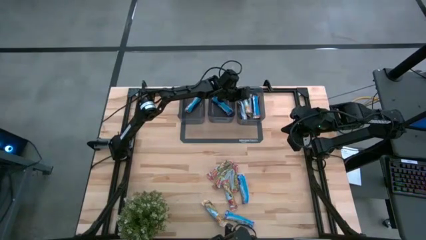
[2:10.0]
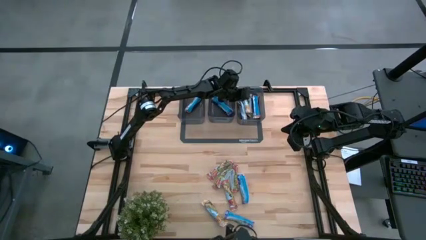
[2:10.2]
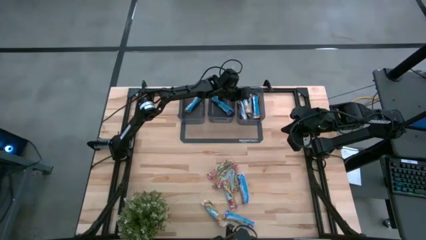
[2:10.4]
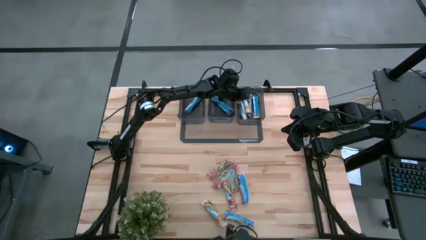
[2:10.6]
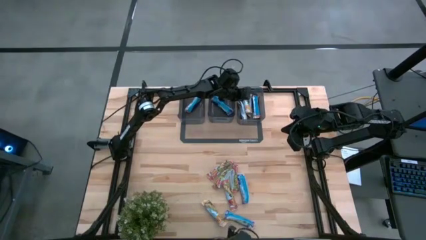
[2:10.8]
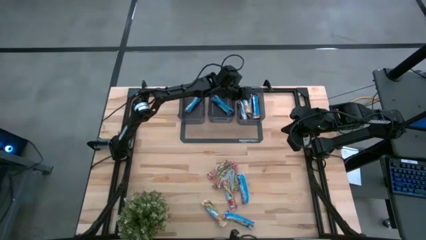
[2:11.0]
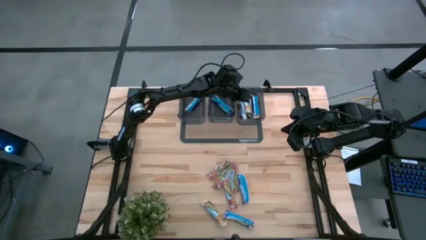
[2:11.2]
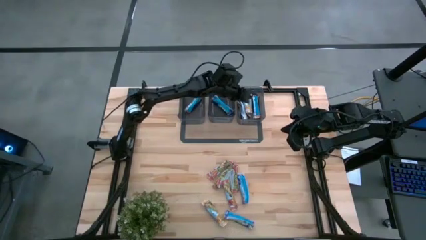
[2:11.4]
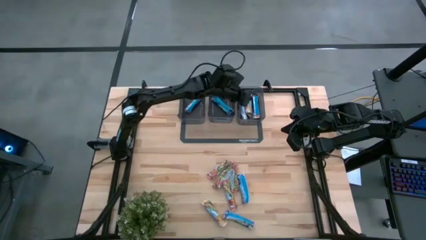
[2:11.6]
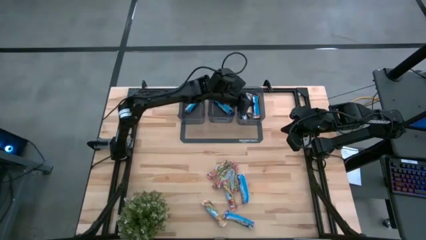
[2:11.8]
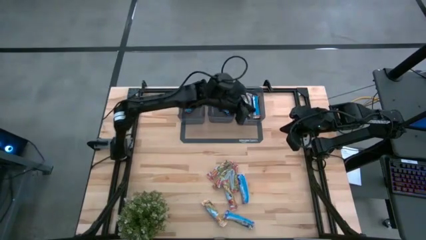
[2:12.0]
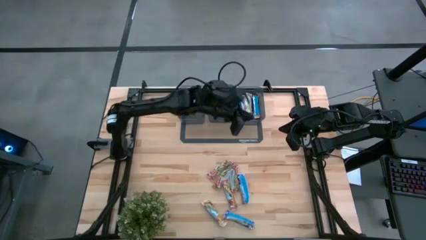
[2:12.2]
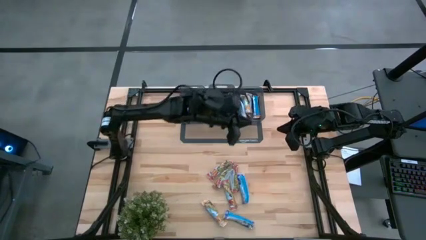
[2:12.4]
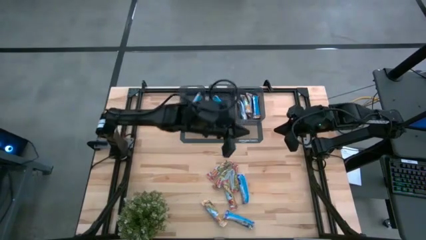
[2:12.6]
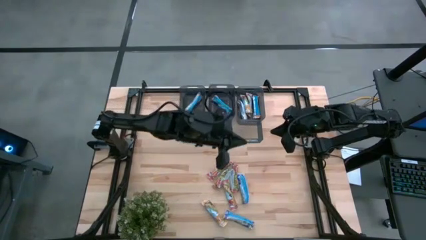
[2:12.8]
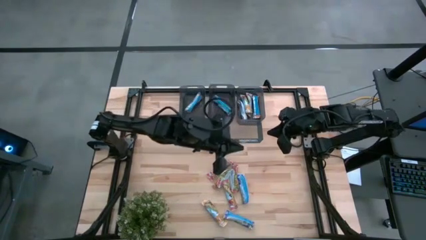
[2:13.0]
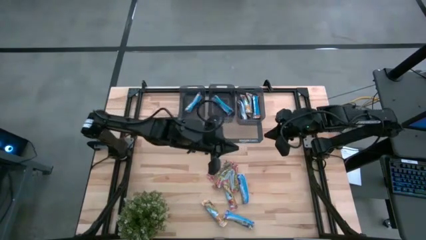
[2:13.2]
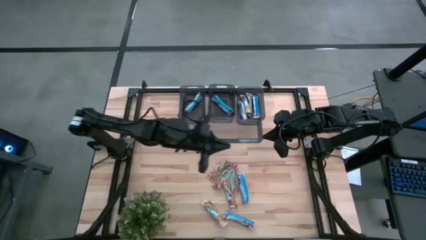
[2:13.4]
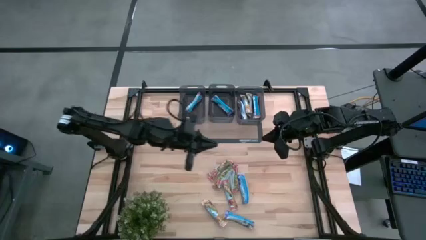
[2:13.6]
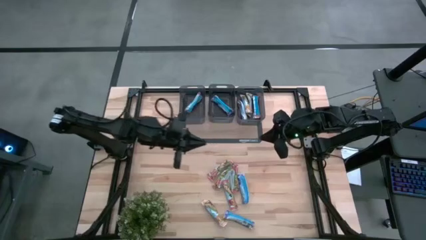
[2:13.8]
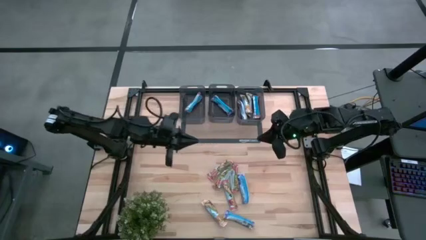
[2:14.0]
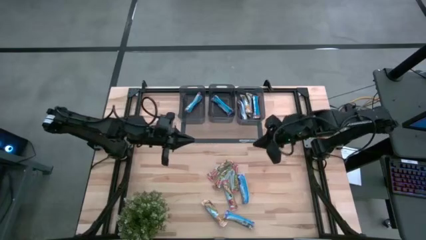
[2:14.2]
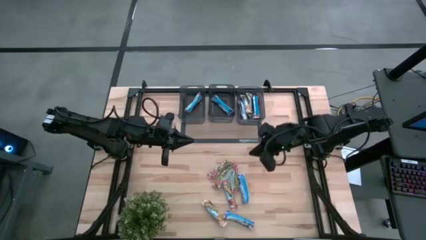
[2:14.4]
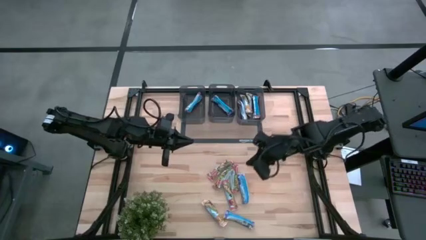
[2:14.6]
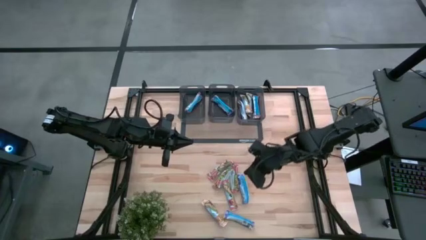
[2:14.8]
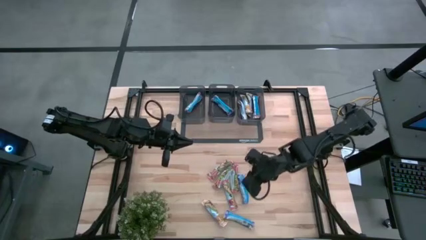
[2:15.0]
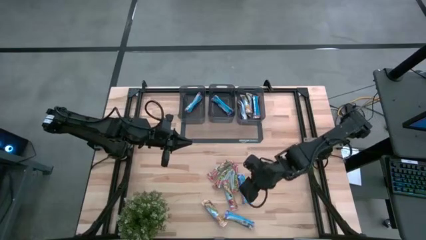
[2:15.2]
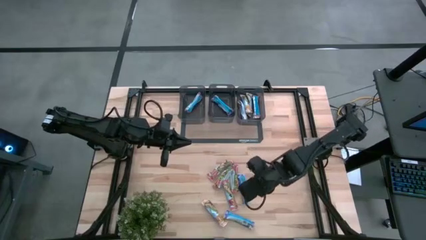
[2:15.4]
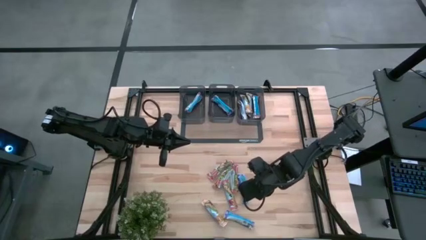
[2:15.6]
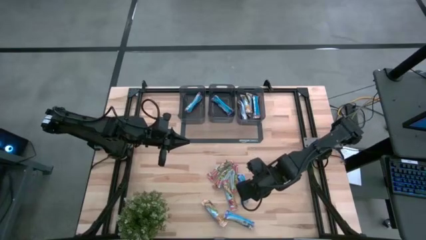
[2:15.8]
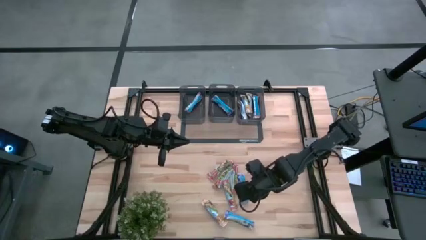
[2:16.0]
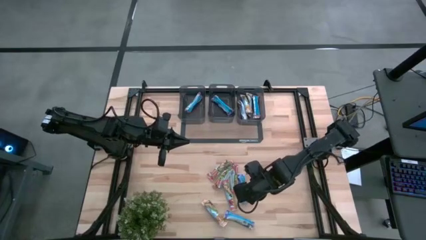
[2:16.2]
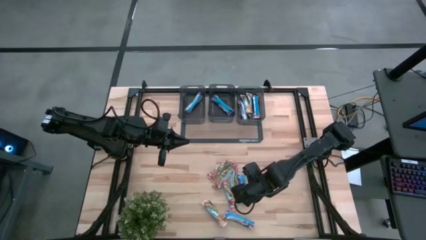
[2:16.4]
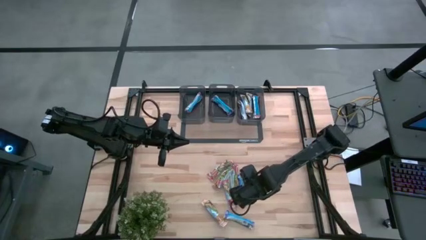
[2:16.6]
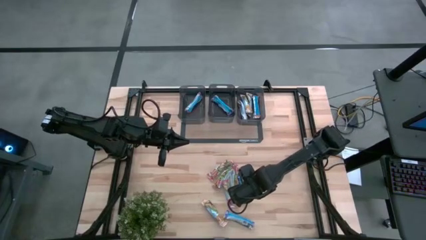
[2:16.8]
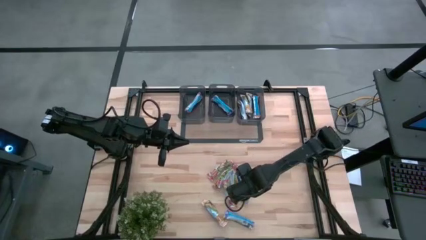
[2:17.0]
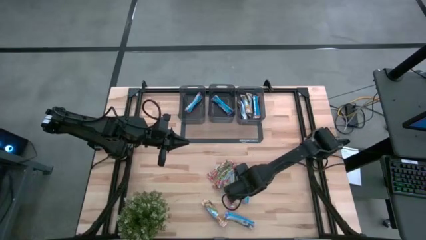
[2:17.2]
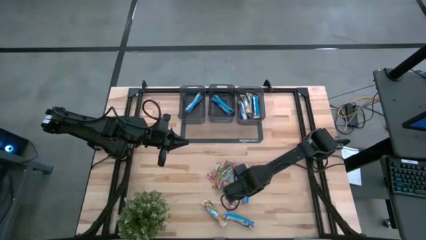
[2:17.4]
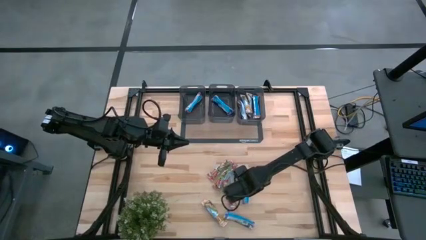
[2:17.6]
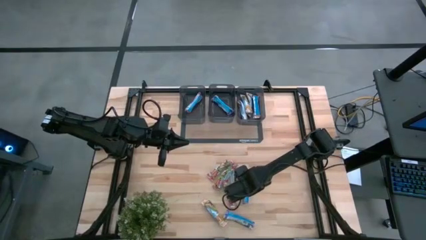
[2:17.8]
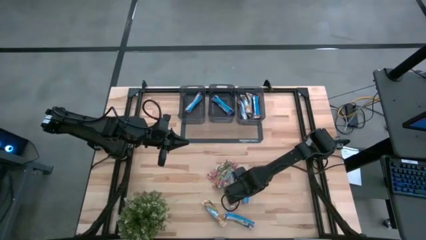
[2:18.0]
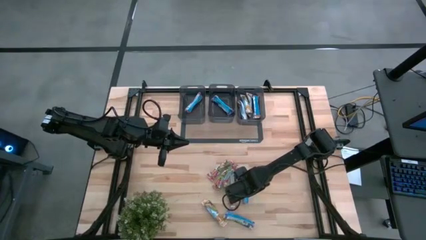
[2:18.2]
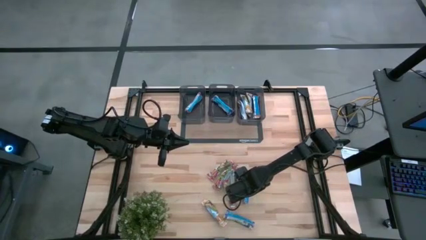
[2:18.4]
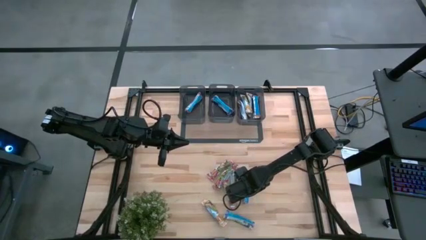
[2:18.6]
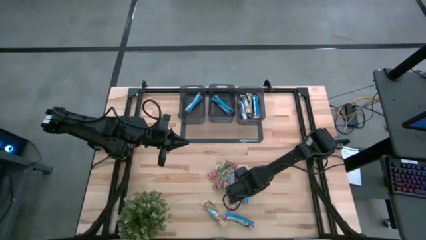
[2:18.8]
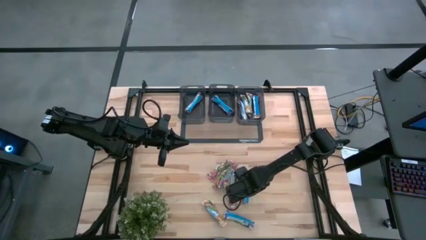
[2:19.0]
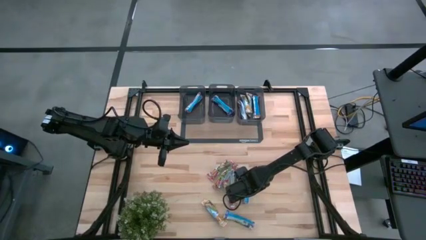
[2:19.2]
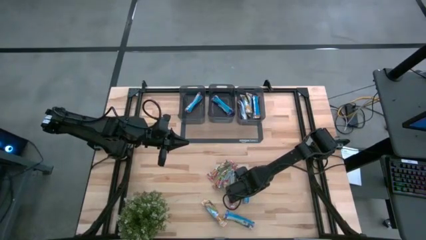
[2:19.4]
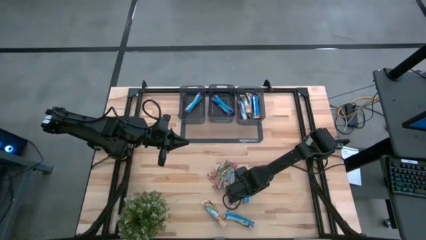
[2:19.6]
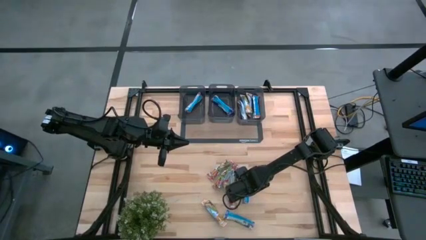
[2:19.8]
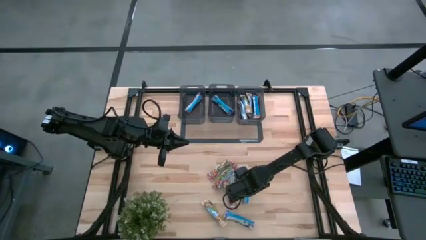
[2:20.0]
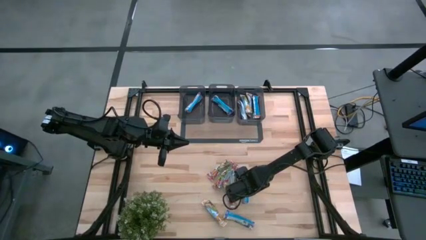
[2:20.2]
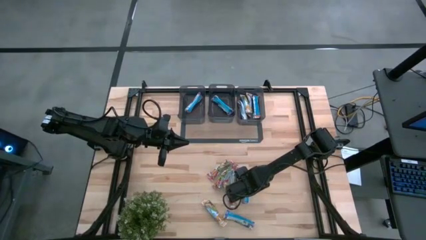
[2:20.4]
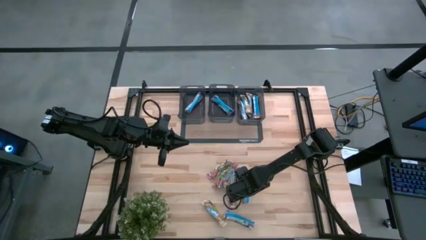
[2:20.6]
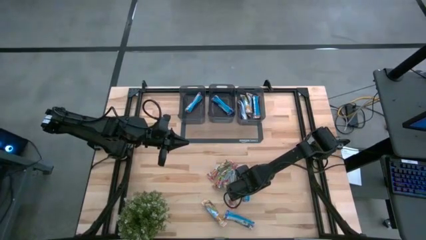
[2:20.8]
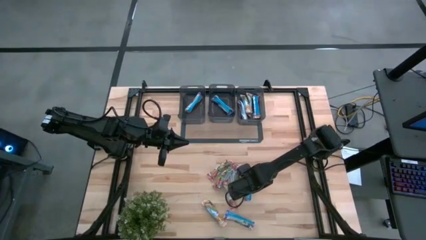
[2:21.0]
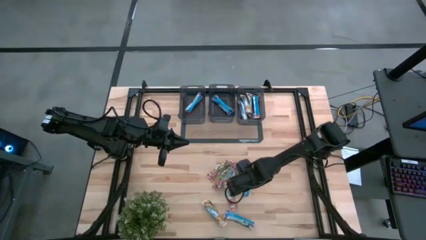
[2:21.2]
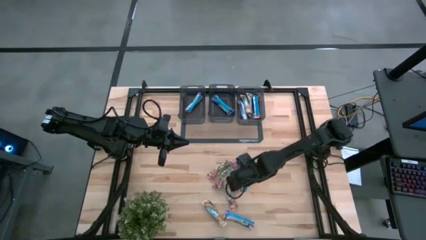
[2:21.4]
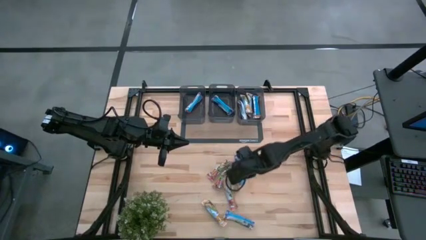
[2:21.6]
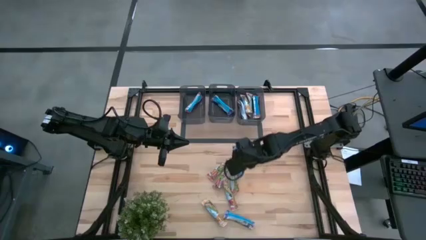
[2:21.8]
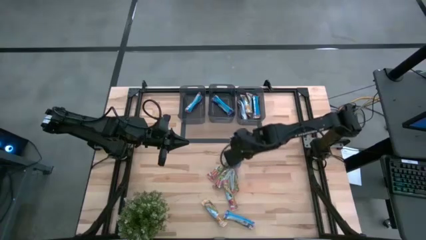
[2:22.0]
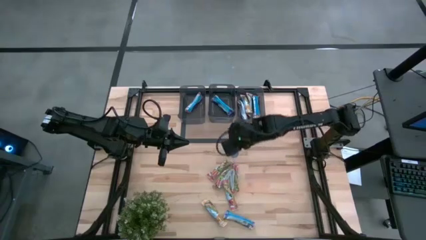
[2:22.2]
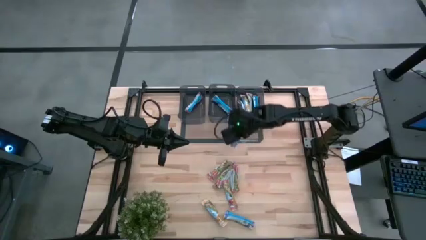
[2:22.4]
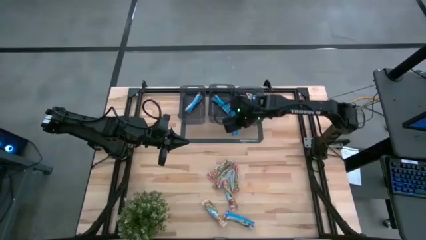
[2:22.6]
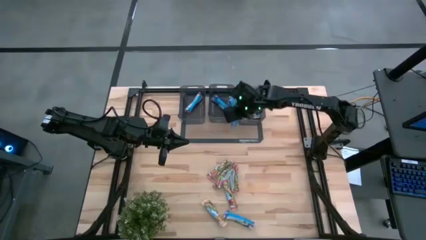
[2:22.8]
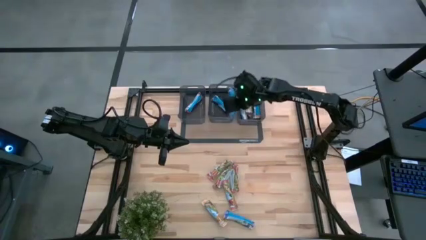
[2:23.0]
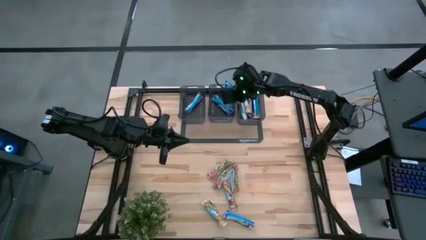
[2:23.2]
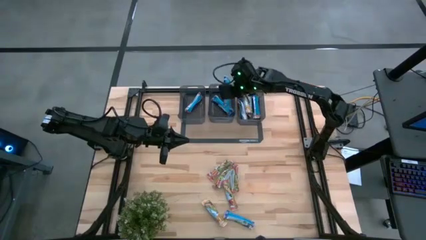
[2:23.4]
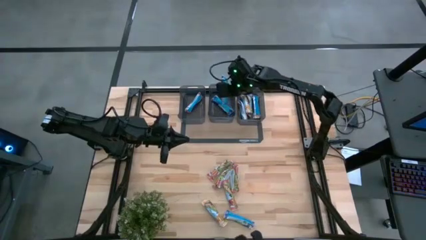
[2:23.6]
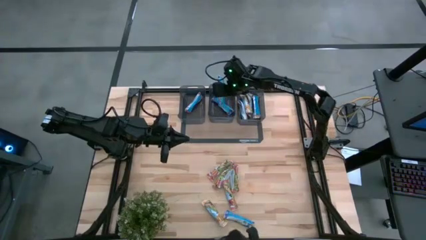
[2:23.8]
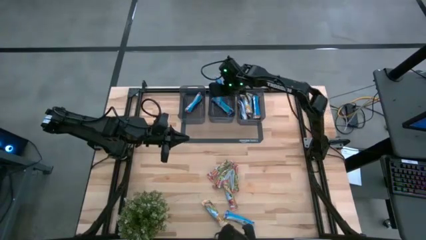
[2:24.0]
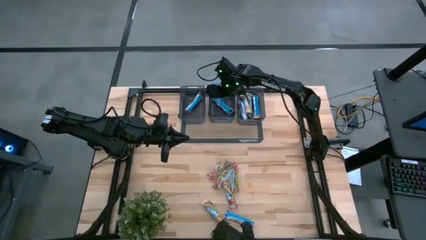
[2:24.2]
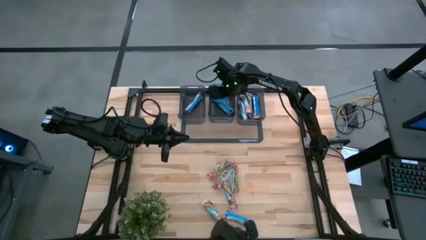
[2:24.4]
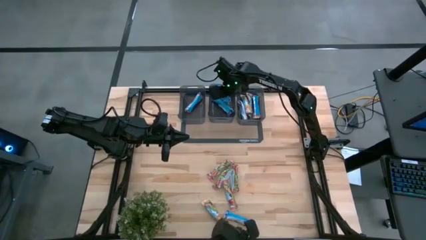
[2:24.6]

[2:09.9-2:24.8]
Task: Pick and place Granola Bars by type
Put the blue granola bar into the center black bin

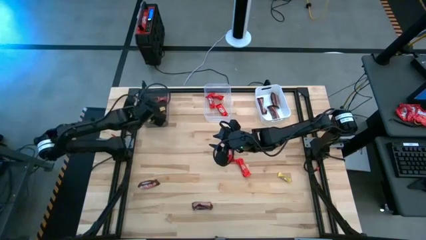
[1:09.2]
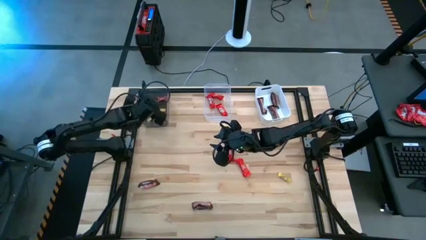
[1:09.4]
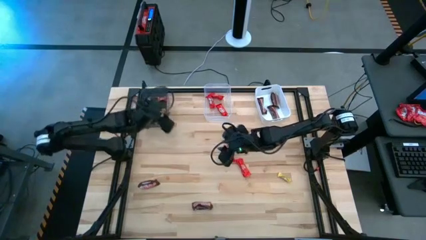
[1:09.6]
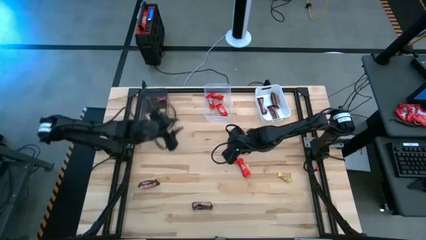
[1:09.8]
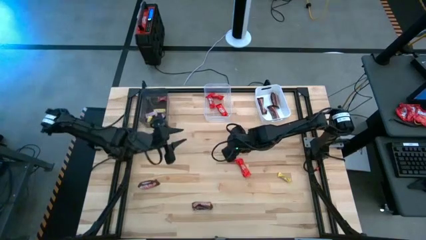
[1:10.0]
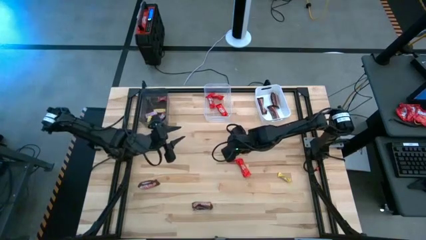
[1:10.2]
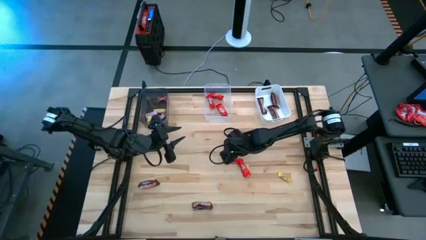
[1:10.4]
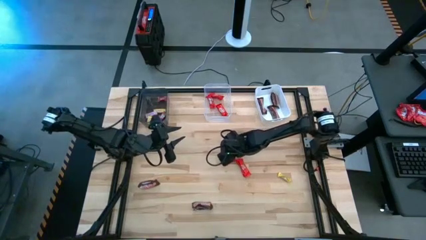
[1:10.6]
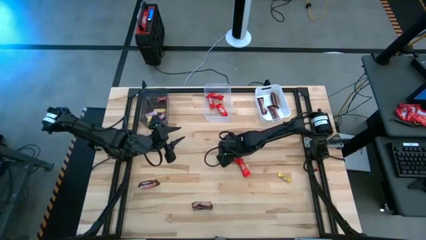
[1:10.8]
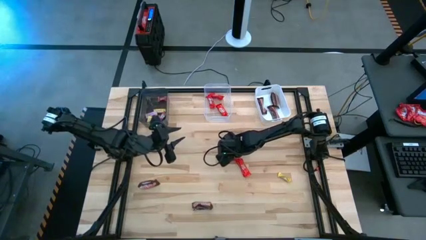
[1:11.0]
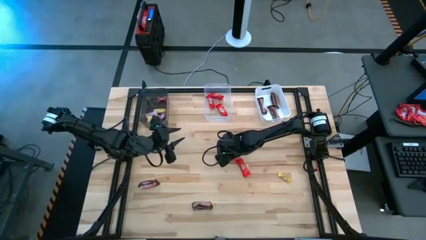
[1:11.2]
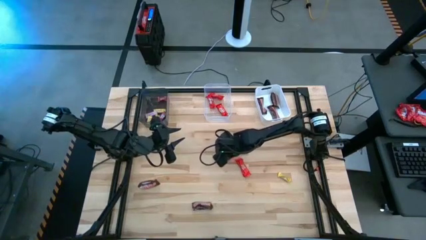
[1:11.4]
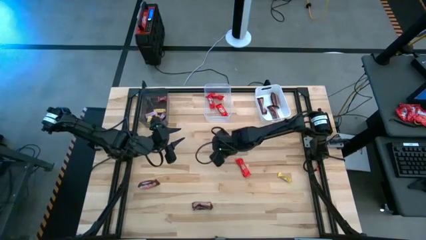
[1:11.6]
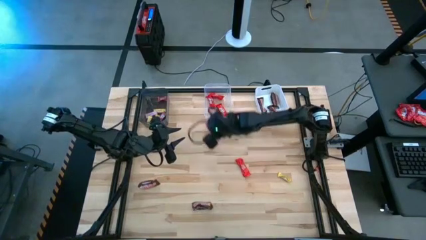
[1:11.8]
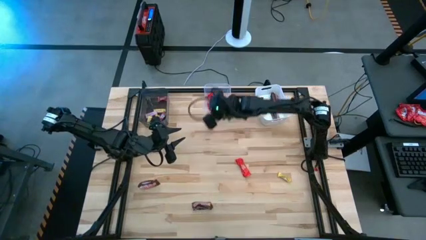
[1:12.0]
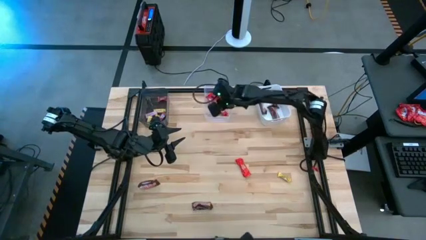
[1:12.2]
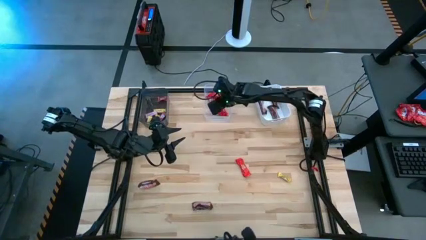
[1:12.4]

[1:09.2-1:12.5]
Task: Sort candy by brand, put in halloween buckets
Put the red chocolate bar into the transparent bin
